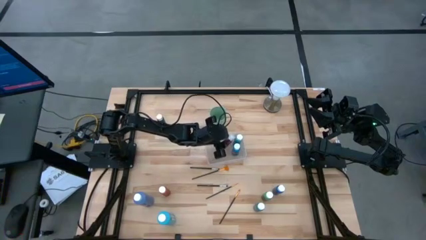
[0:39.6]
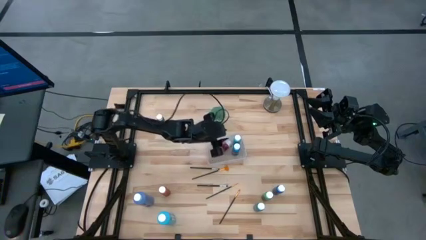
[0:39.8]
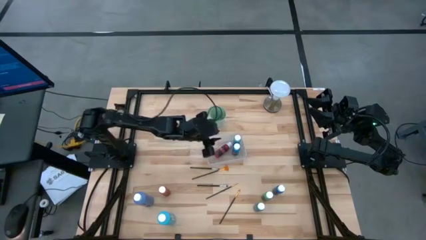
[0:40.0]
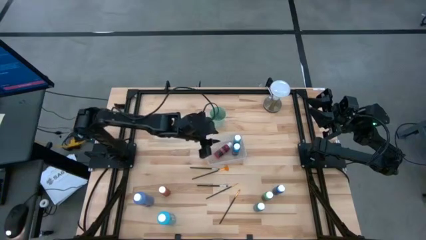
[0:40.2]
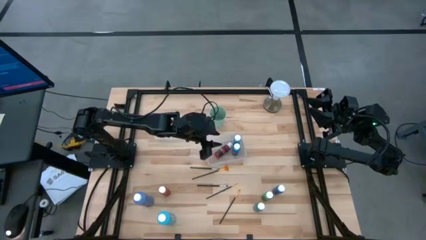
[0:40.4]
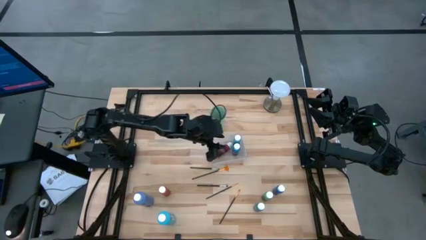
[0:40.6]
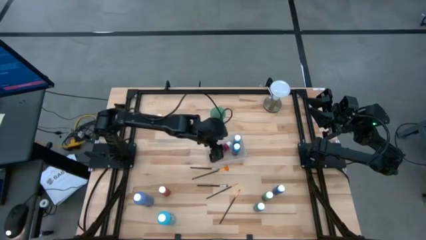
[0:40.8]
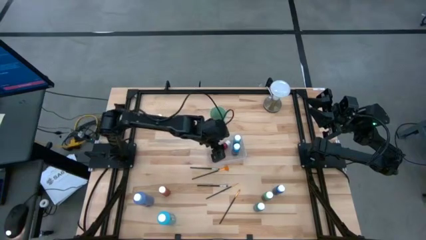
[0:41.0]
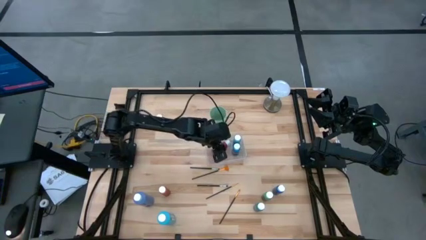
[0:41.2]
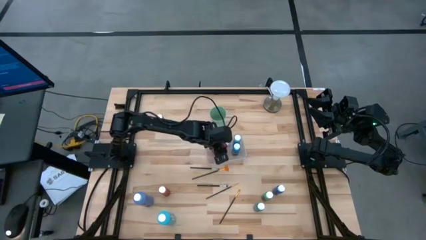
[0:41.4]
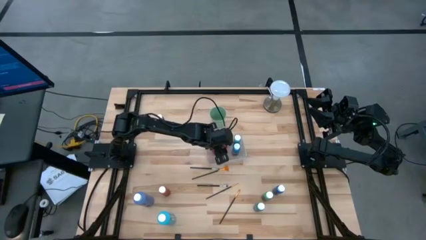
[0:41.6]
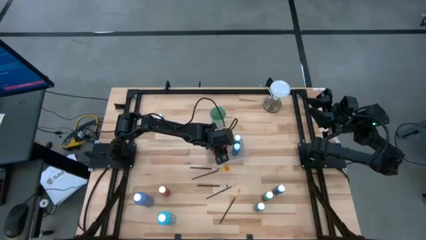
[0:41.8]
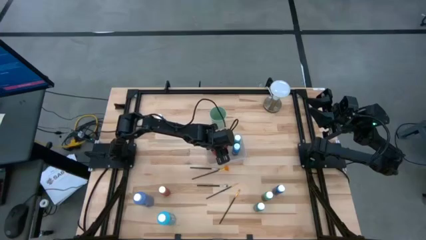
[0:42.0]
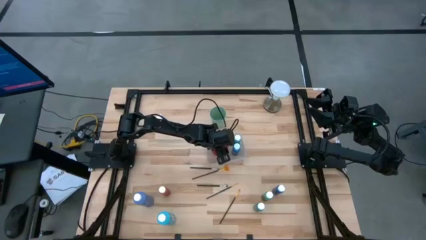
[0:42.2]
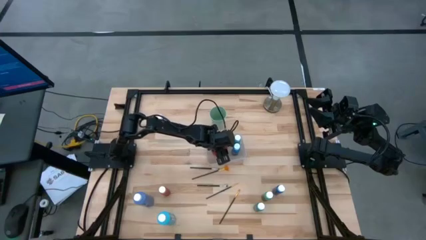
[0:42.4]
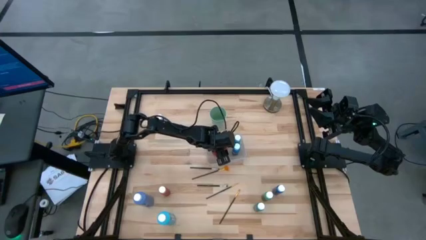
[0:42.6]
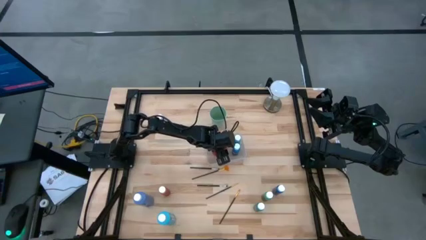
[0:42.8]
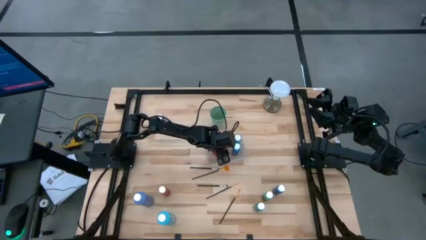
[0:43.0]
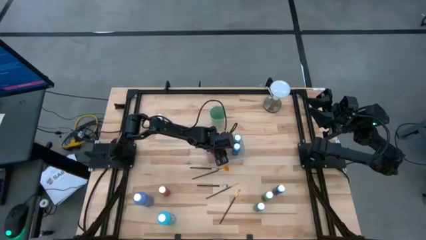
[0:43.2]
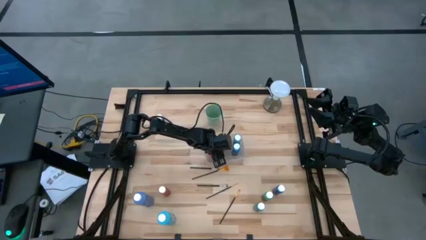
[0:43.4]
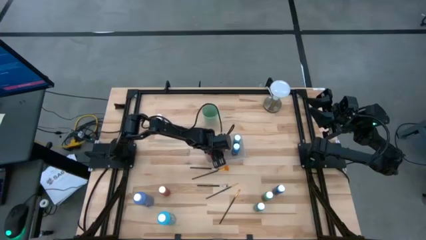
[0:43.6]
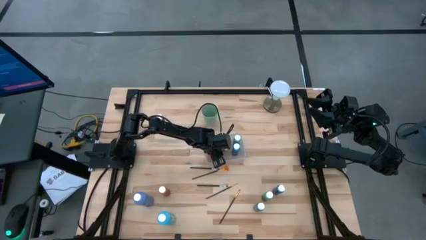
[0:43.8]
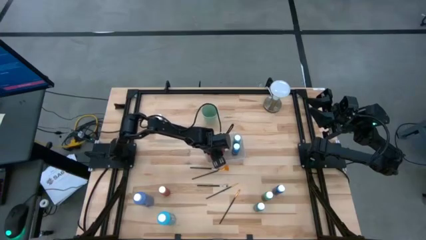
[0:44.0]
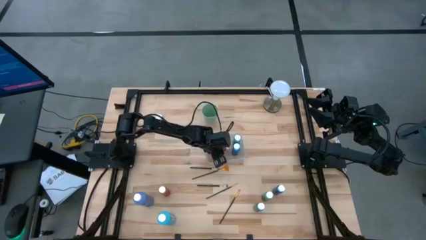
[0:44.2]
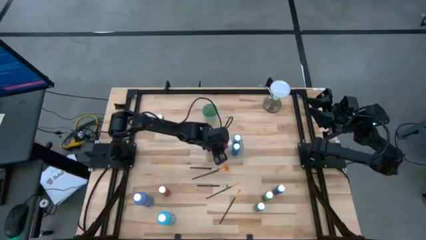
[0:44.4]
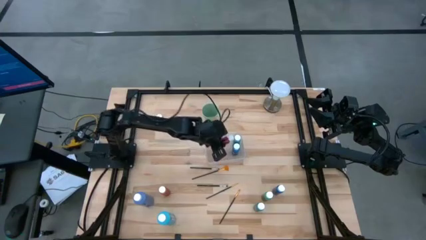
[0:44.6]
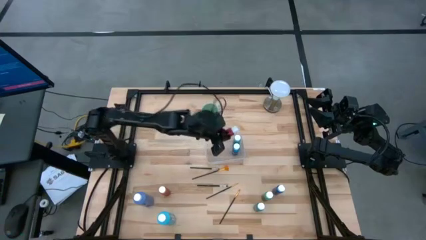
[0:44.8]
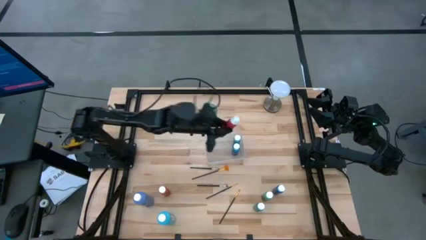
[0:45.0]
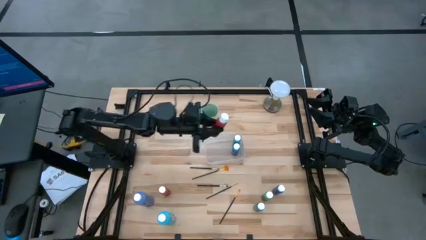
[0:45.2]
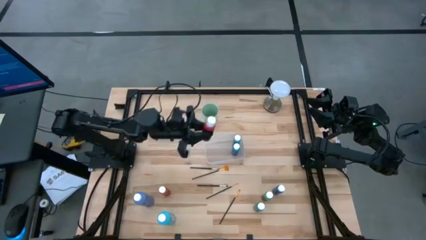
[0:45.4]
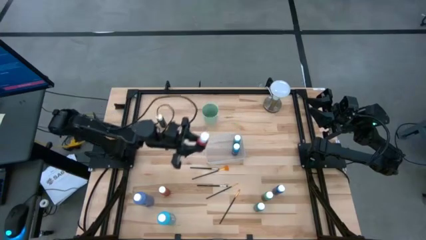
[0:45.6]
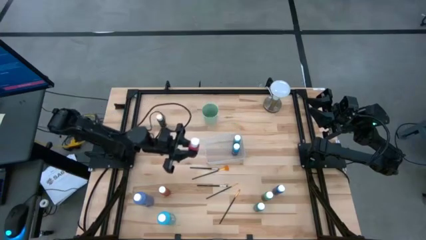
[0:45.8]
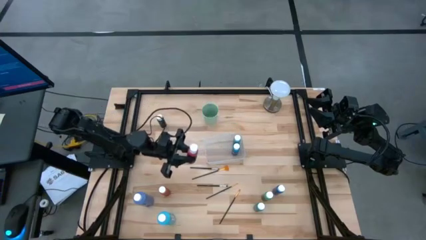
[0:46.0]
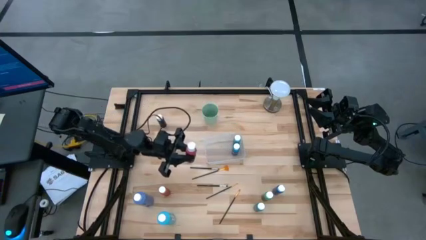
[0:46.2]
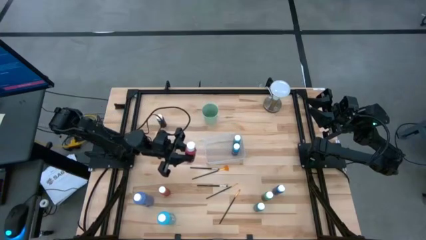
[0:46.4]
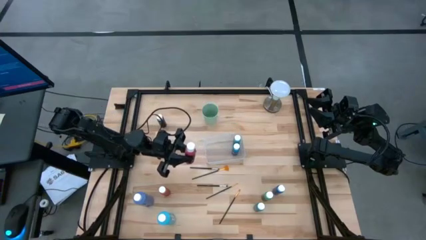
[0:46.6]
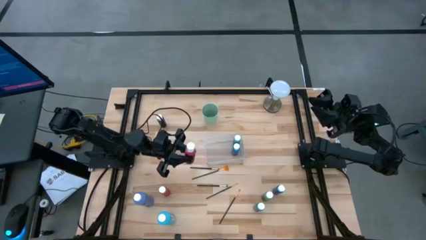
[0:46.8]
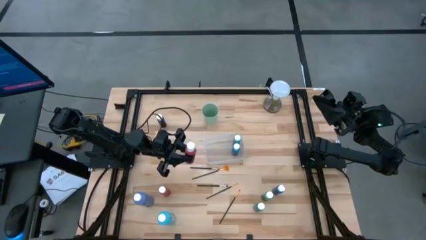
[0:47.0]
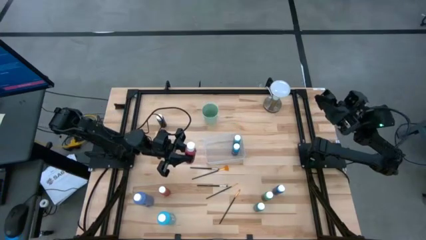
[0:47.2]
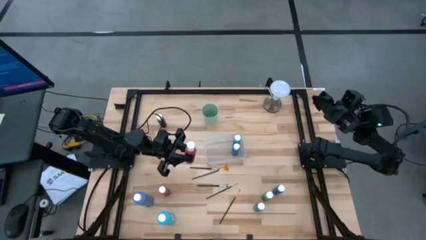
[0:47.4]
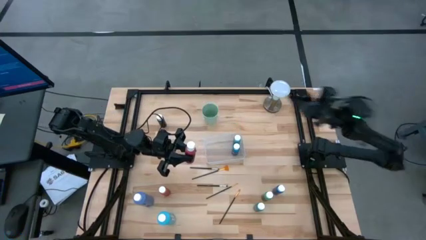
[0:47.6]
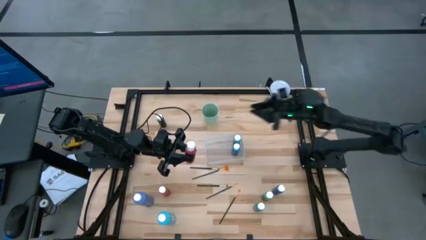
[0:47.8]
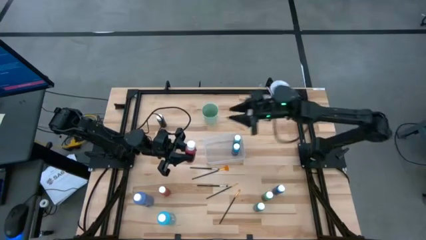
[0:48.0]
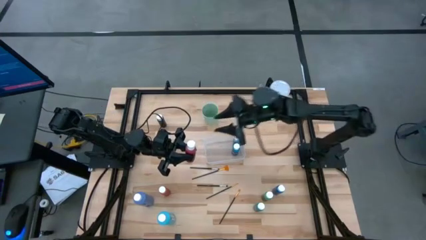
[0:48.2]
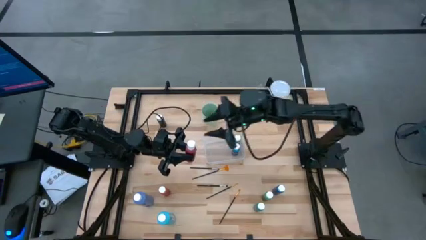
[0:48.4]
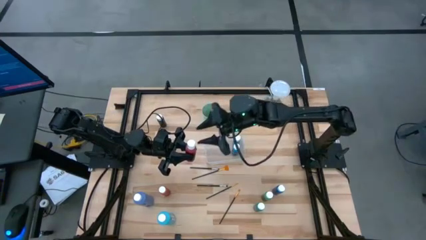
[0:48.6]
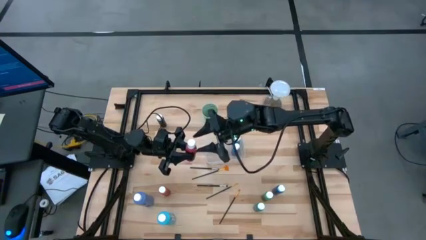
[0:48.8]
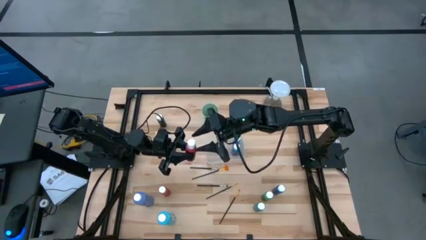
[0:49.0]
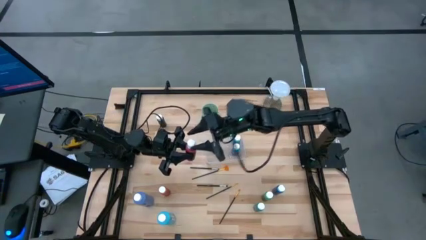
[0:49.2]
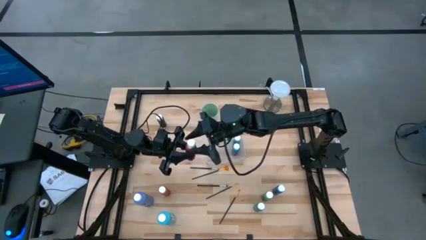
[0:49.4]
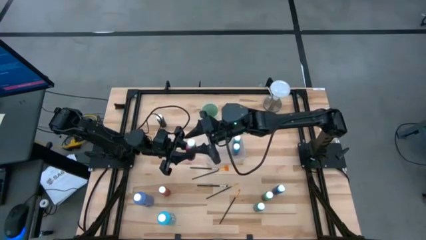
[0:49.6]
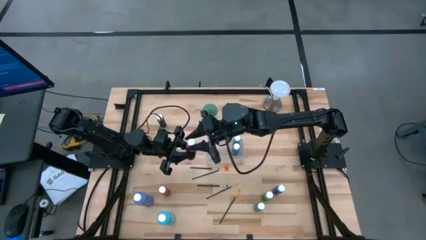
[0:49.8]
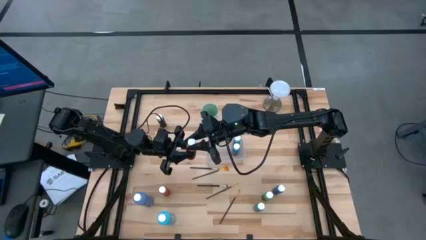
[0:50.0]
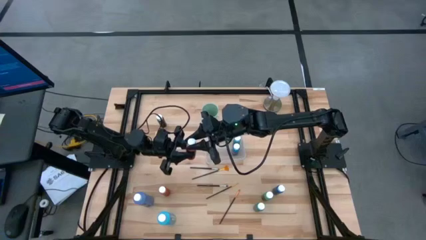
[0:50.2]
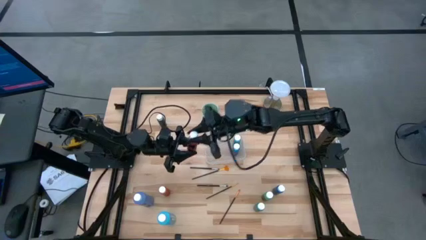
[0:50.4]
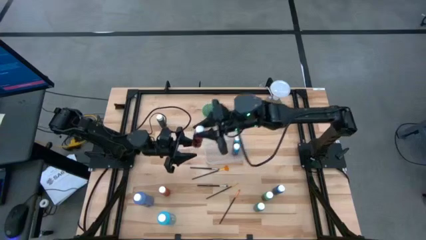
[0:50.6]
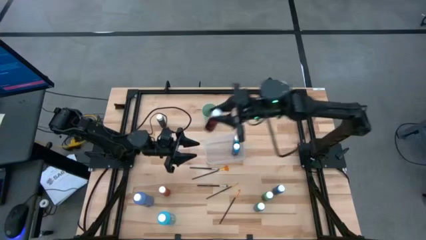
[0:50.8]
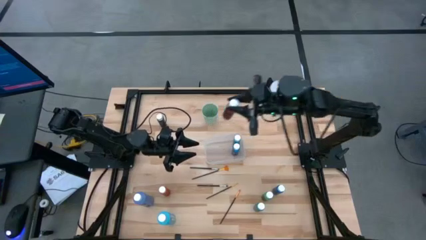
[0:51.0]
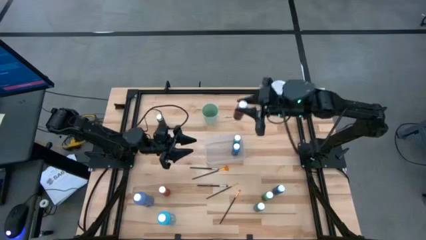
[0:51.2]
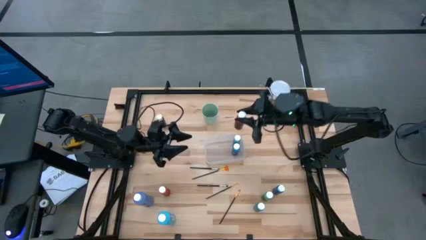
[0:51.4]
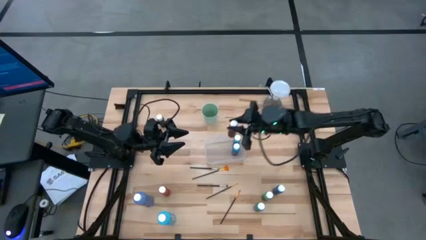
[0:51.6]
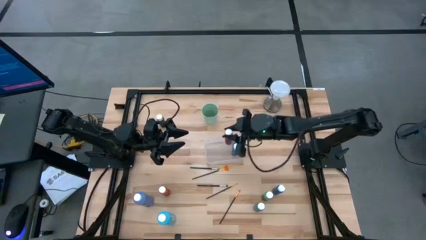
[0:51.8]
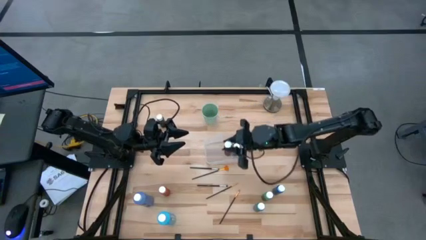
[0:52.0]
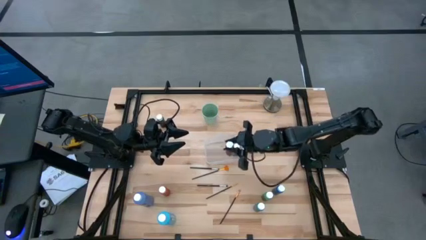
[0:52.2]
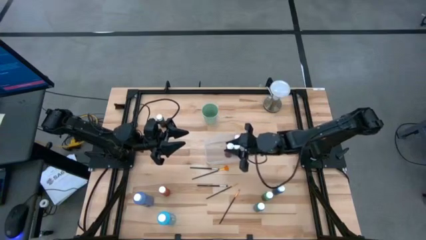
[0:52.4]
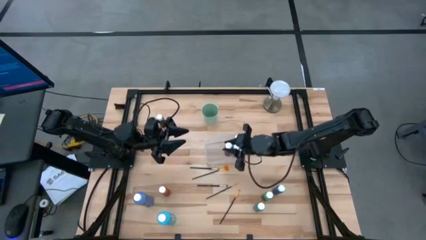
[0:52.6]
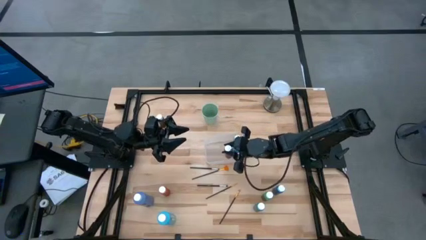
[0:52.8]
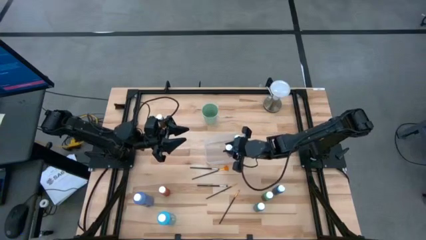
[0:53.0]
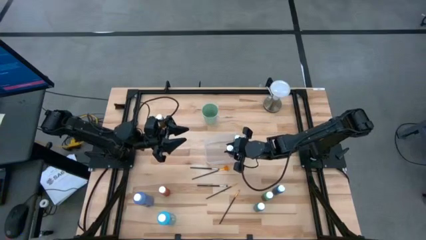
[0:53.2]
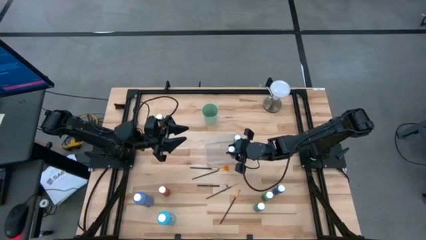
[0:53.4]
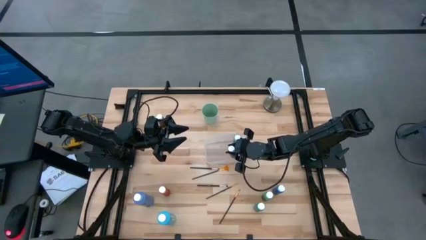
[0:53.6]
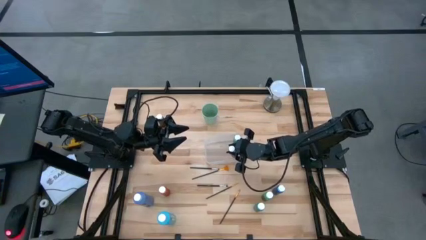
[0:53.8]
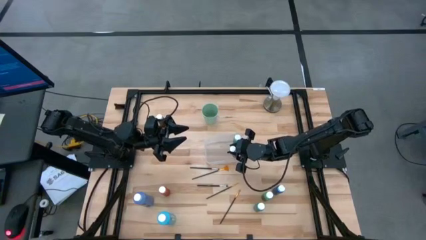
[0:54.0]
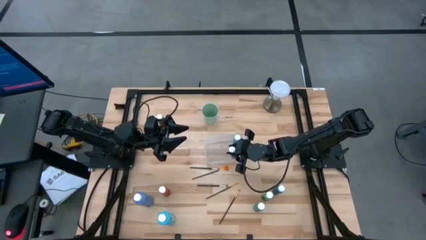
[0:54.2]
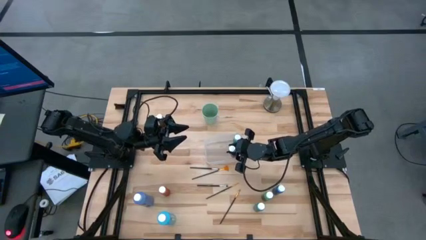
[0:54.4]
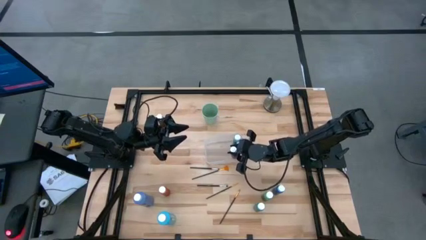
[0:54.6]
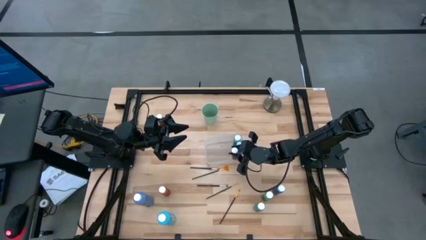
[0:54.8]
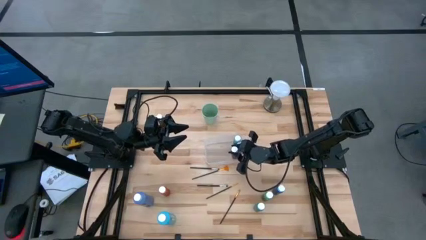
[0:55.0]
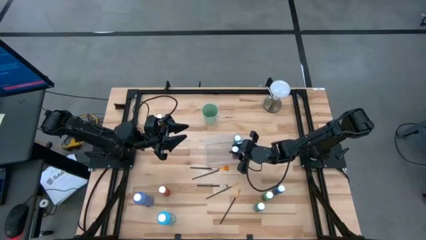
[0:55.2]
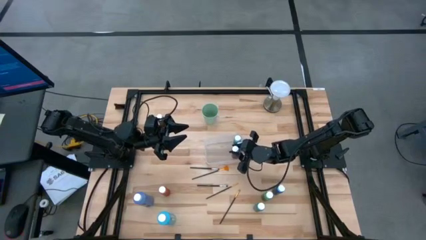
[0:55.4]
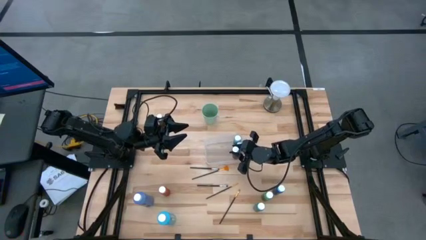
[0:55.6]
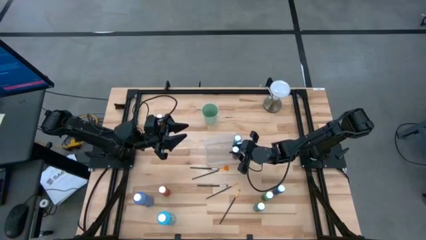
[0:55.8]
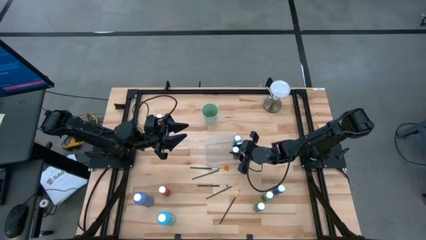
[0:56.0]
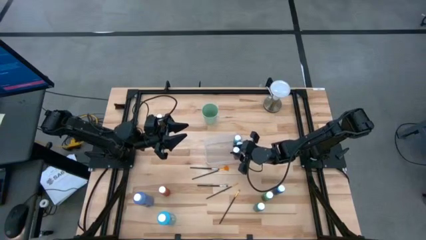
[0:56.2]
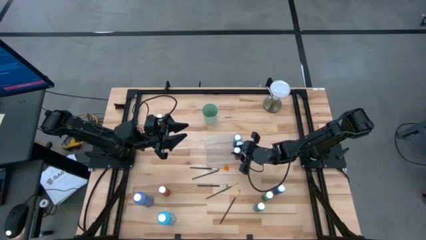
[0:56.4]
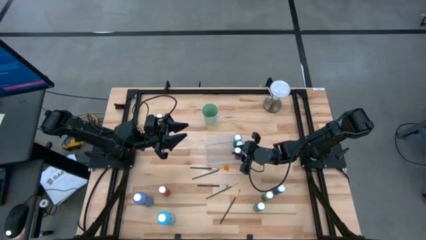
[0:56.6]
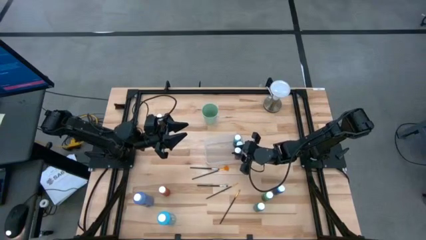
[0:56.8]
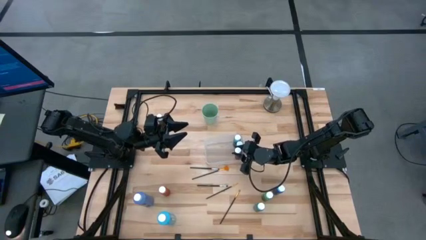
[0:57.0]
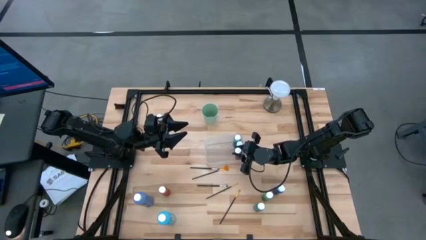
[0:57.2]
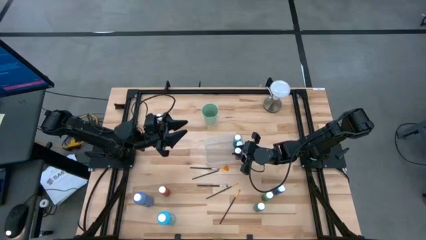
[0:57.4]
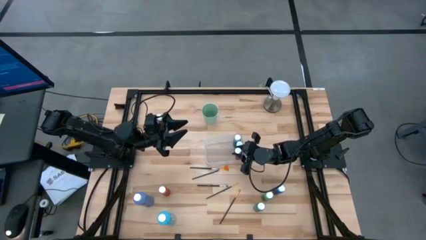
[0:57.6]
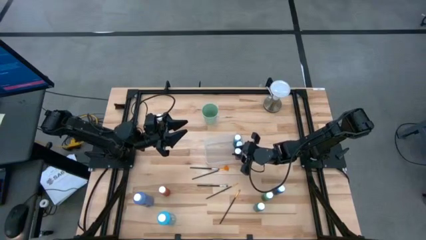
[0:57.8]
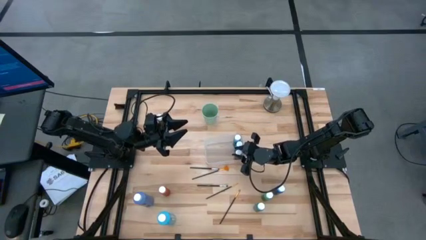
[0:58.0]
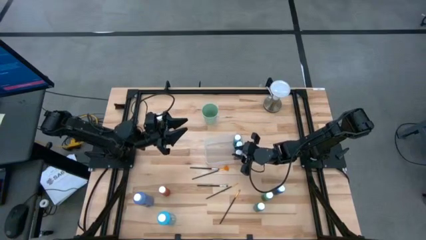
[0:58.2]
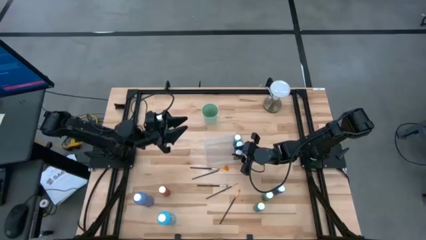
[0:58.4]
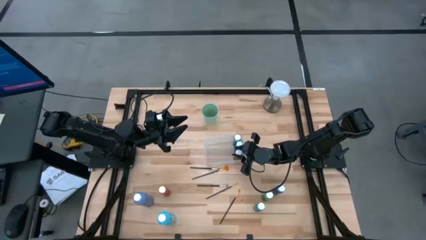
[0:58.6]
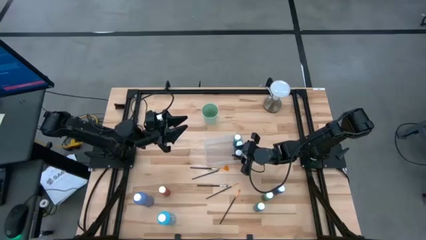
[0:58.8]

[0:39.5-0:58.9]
Task: Pick & Place Paint Supplies
Put the red paint bottle into the transparent bin
